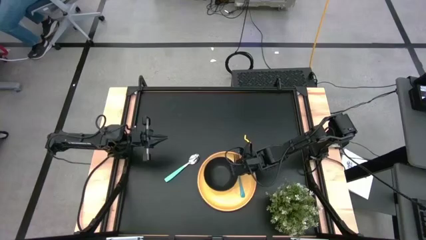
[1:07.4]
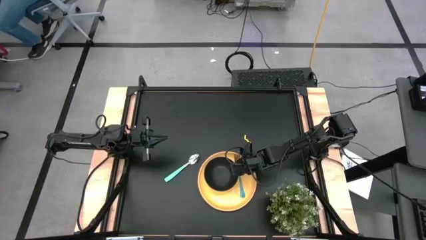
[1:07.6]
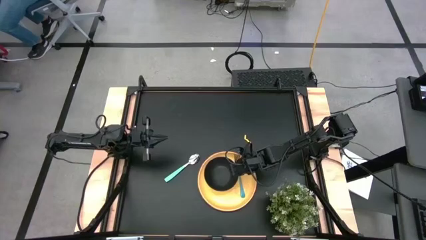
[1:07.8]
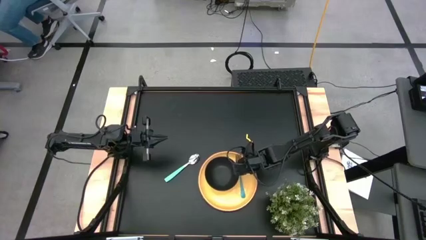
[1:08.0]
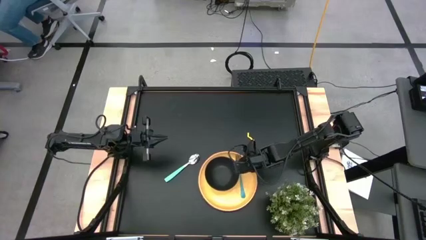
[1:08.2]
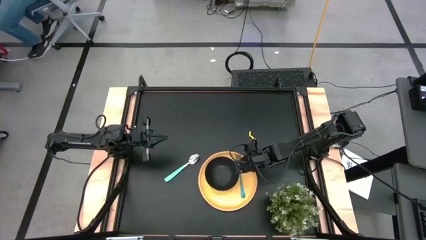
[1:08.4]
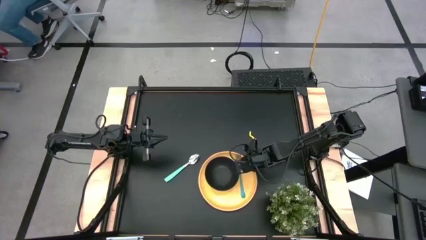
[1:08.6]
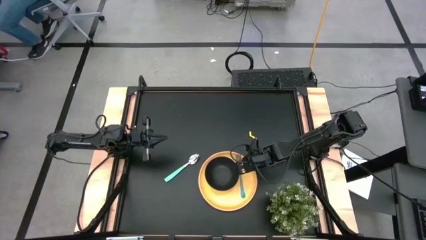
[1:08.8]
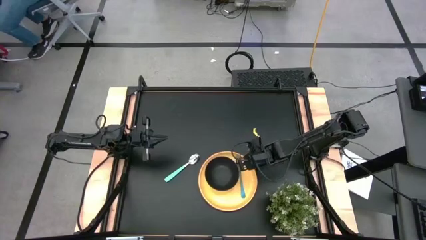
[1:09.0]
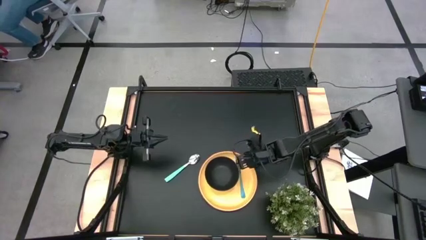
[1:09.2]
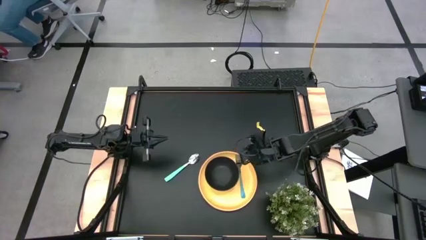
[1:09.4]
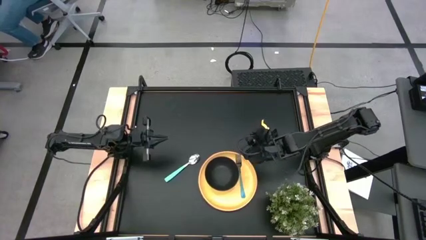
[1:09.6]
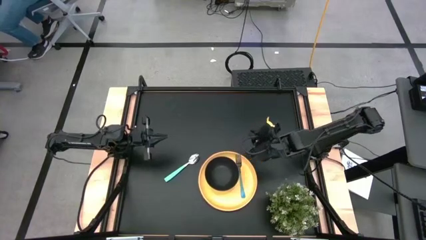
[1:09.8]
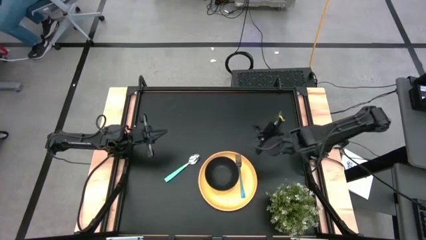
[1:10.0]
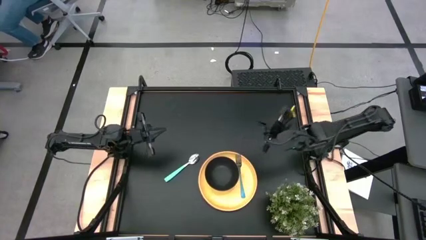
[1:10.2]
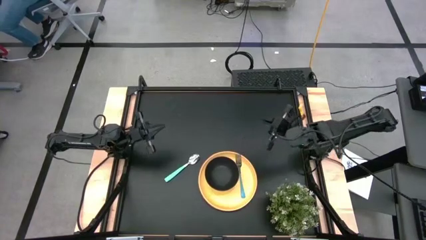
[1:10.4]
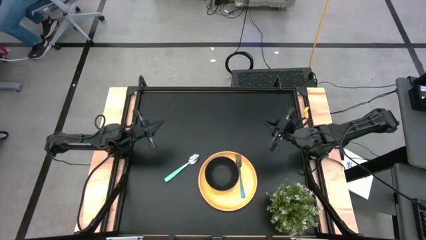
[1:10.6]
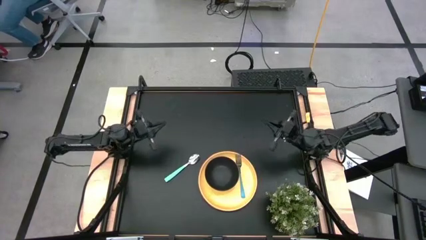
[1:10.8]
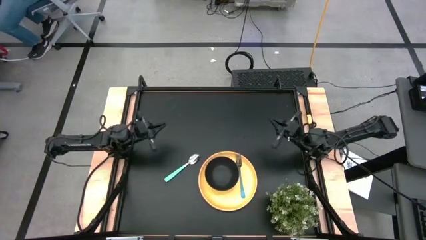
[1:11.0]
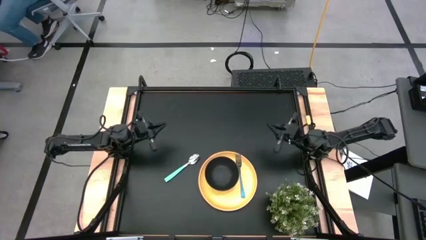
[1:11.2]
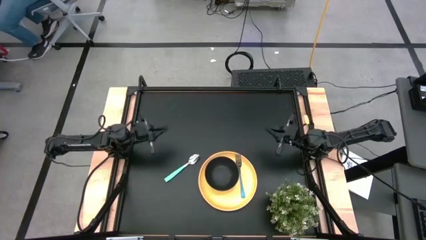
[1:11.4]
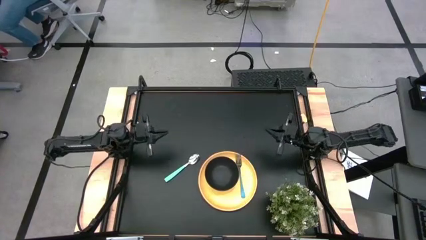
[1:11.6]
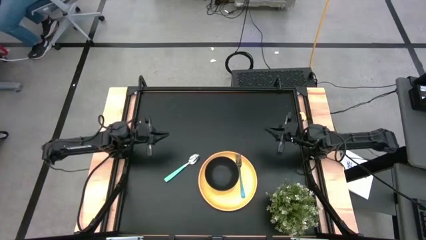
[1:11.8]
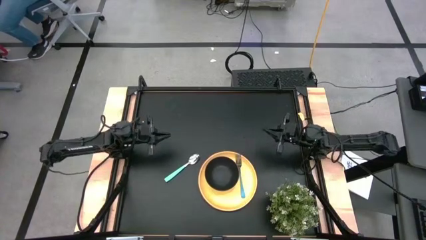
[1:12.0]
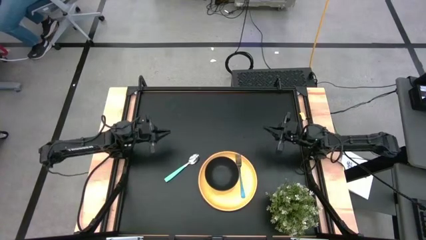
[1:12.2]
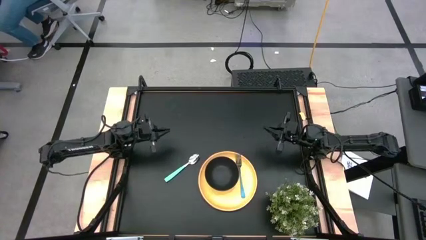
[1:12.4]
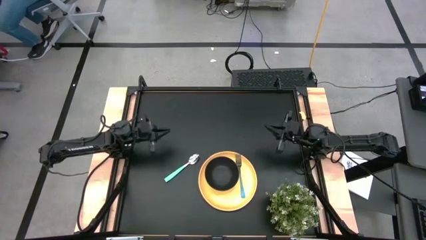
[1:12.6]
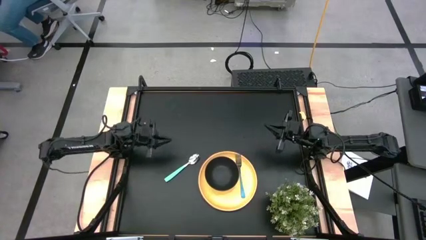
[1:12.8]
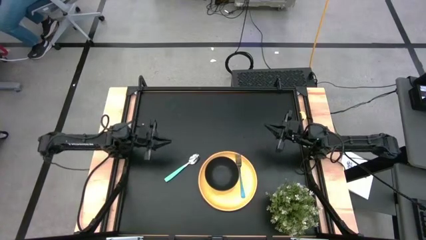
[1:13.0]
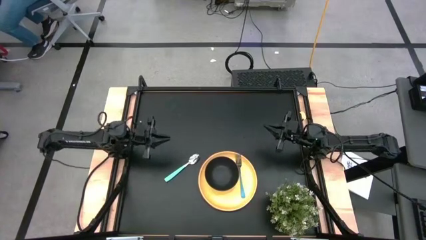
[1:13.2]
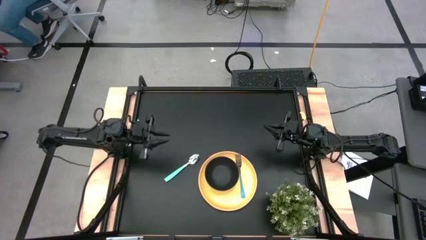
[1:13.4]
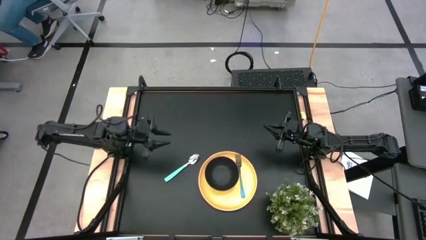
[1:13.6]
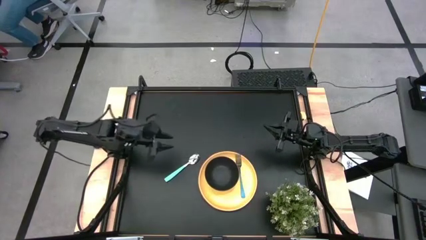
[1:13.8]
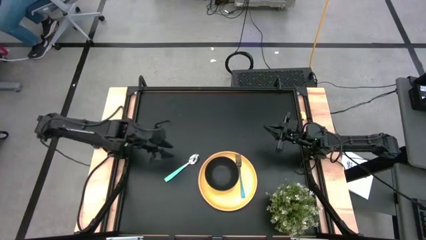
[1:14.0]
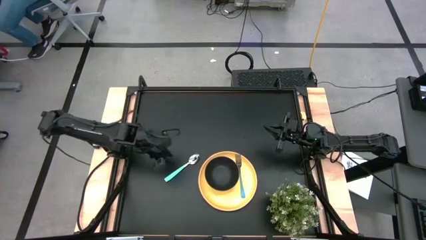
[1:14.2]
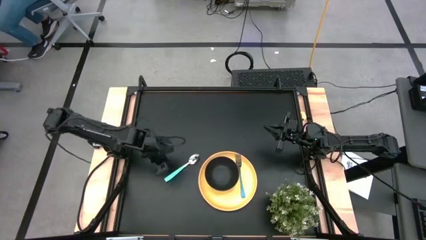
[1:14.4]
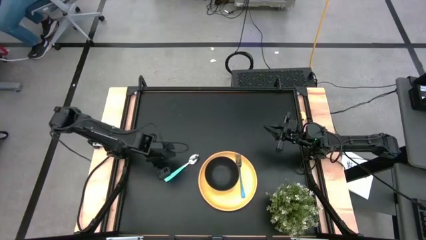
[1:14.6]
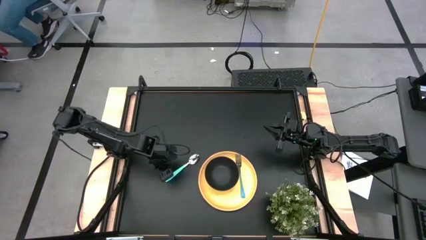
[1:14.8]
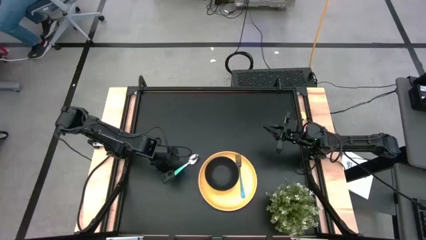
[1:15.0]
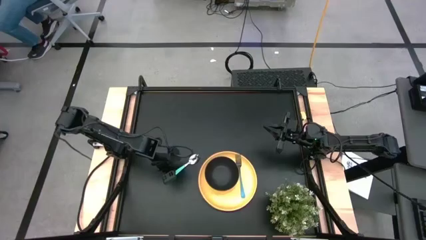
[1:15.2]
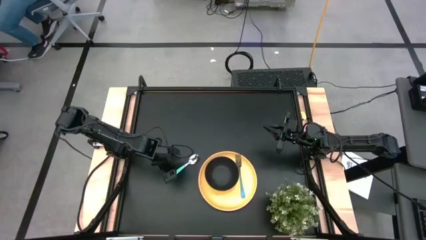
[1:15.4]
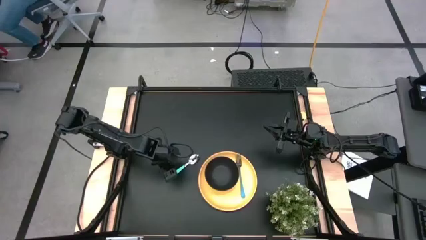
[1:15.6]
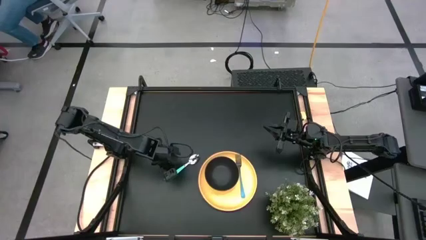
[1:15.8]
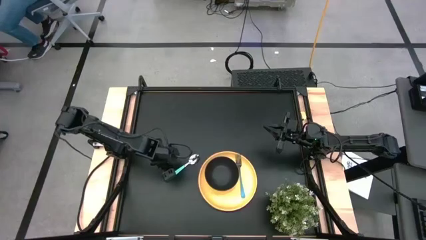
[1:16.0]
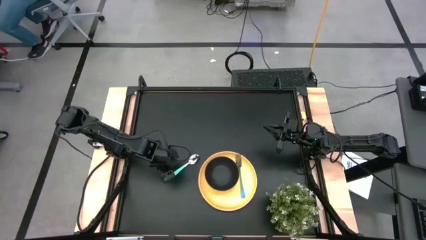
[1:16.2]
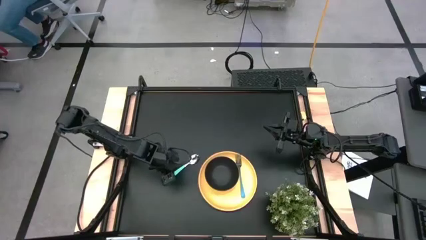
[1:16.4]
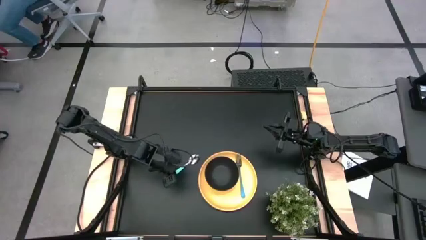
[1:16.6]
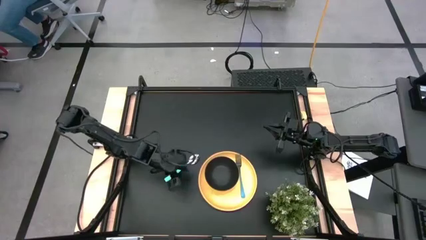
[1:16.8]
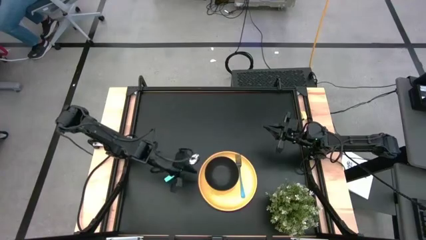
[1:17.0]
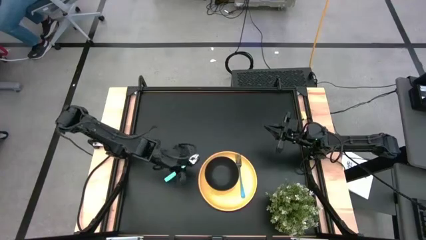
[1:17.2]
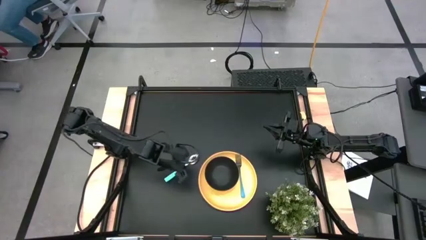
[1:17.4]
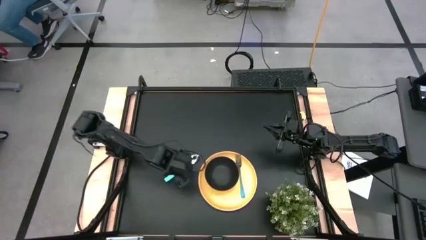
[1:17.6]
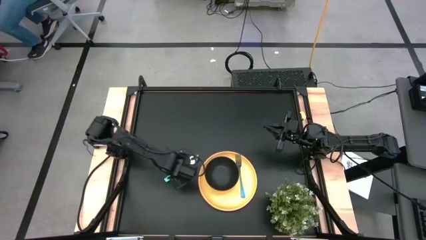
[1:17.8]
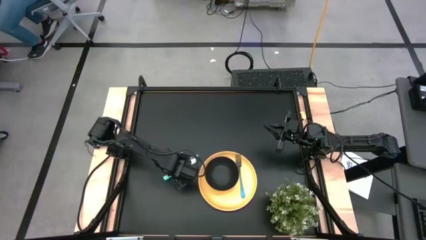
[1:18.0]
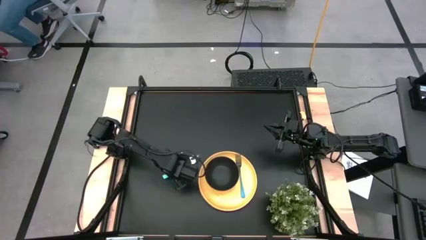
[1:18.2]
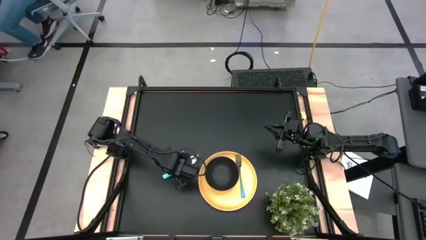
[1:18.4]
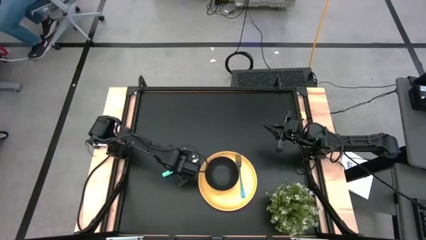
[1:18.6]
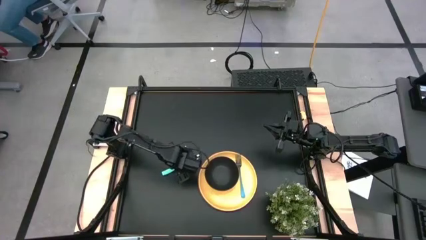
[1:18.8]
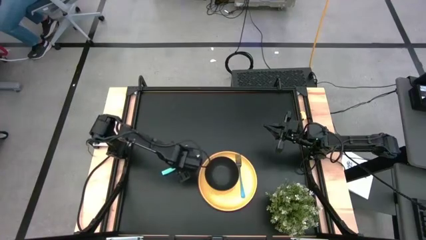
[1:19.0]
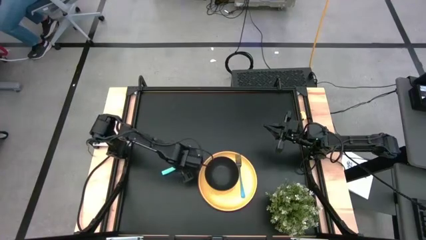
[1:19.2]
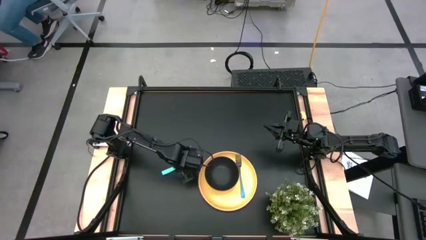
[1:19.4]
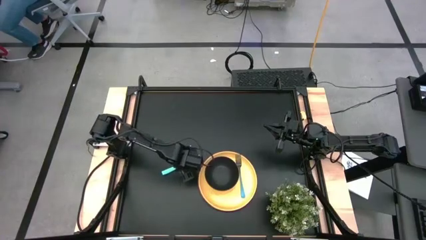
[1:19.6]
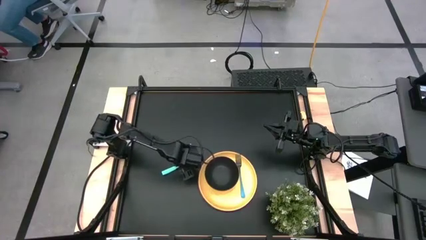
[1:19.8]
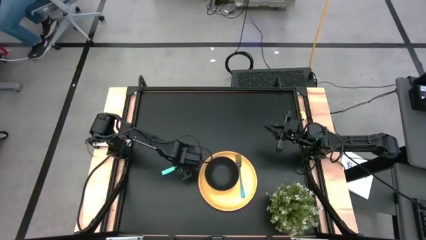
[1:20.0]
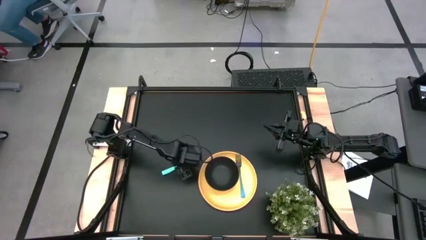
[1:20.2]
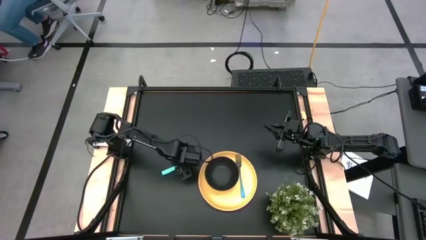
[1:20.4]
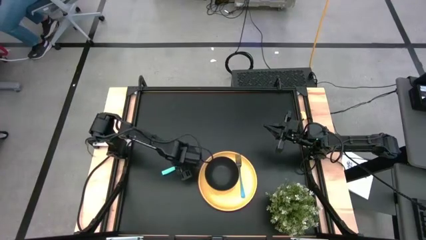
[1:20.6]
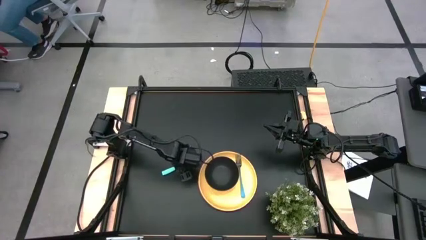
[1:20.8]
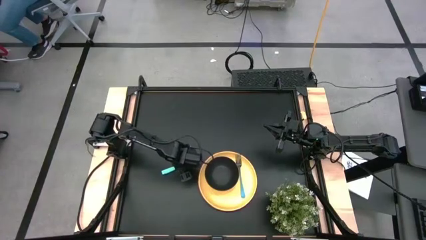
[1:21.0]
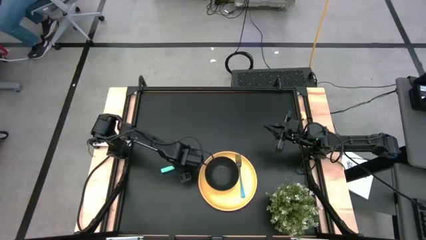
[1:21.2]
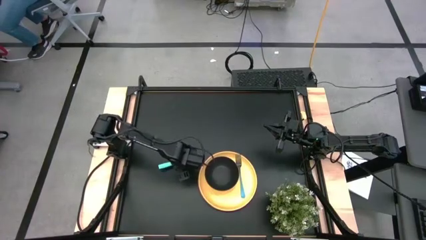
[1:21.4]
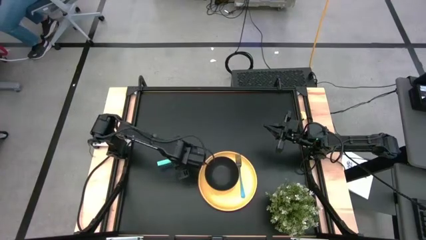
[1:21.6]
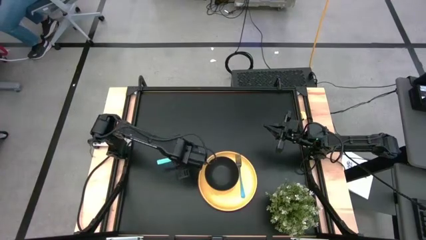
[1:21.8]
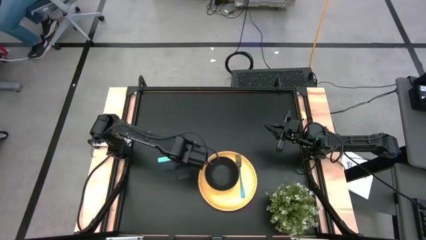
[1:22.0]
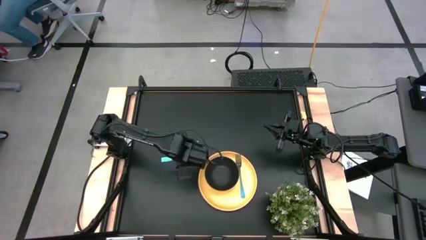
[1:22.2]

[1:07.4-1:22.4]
Task: Pick and place plate/cup/fork/spoon on tray
Put the blue spoon into the black bowl
